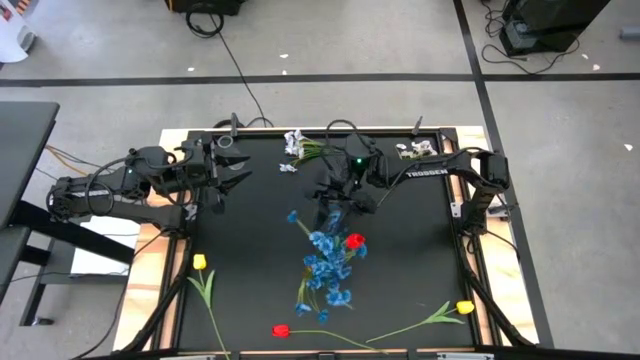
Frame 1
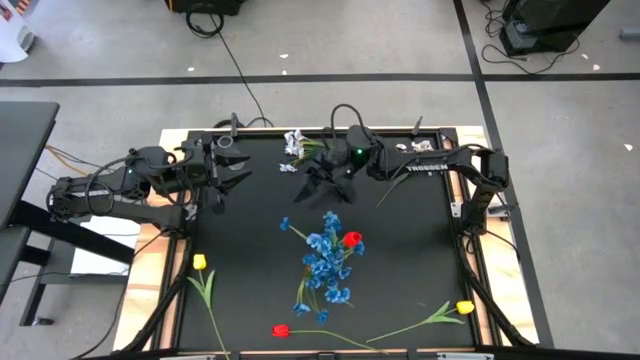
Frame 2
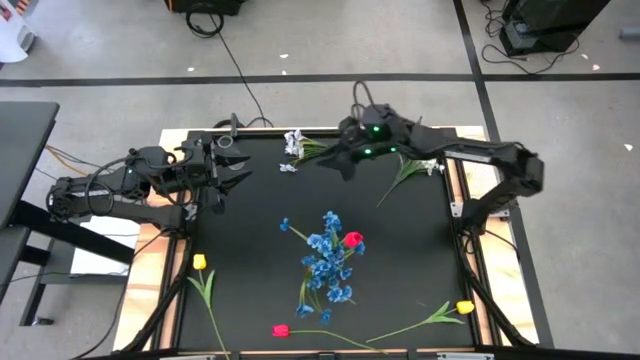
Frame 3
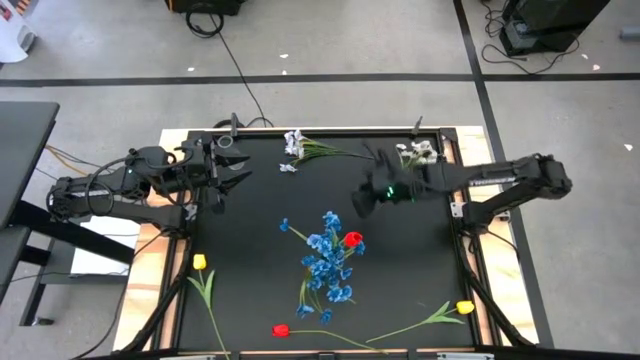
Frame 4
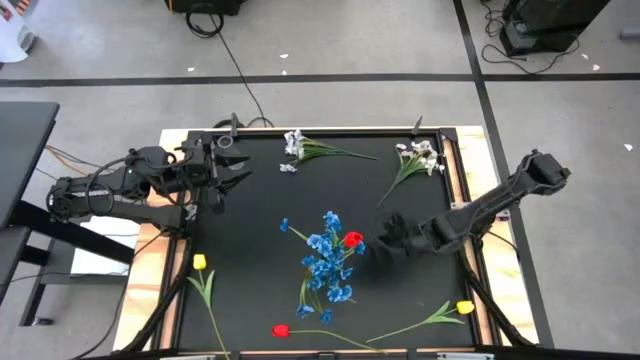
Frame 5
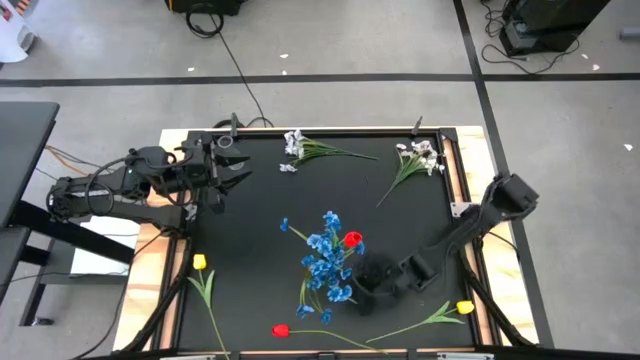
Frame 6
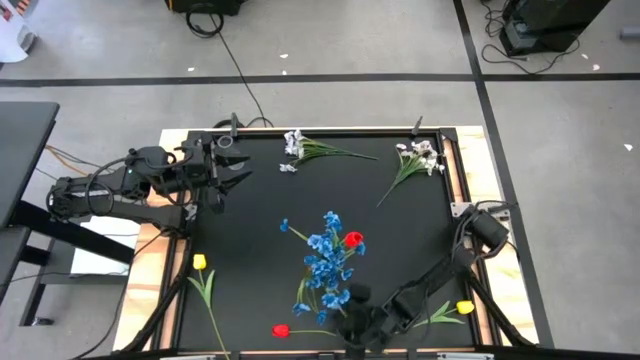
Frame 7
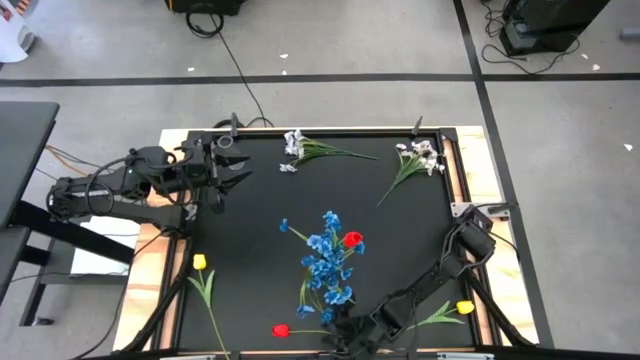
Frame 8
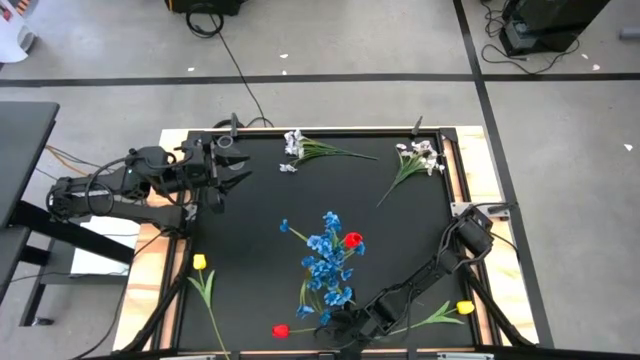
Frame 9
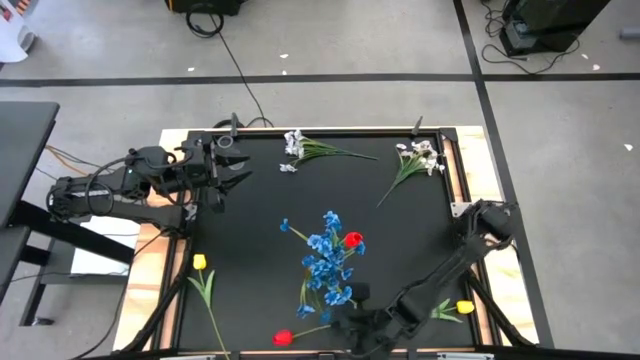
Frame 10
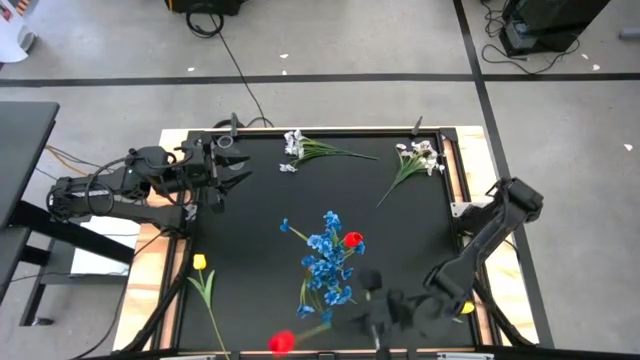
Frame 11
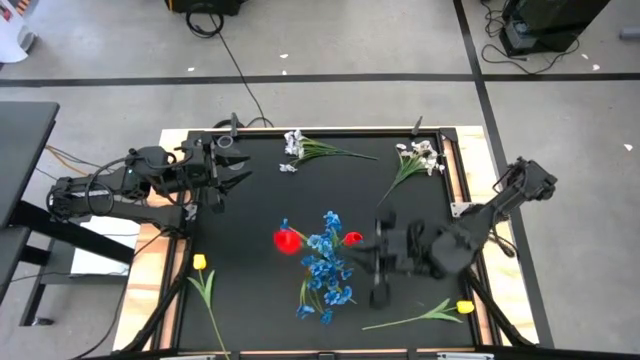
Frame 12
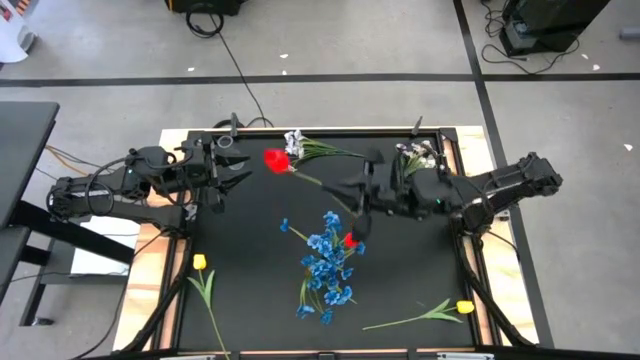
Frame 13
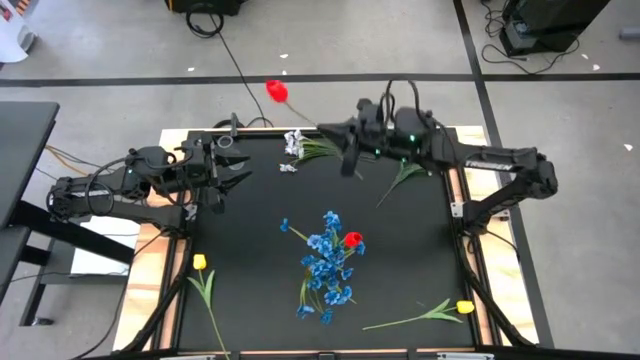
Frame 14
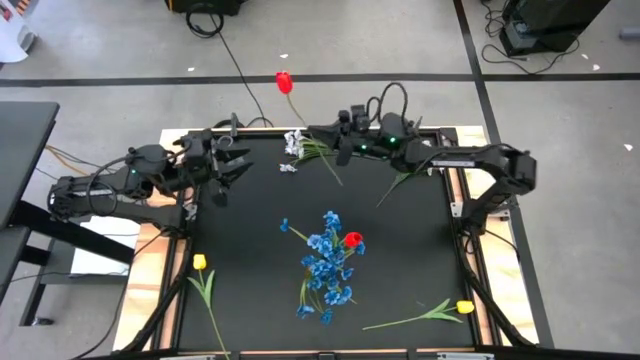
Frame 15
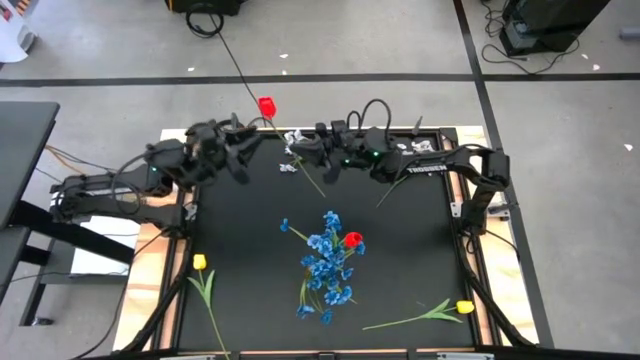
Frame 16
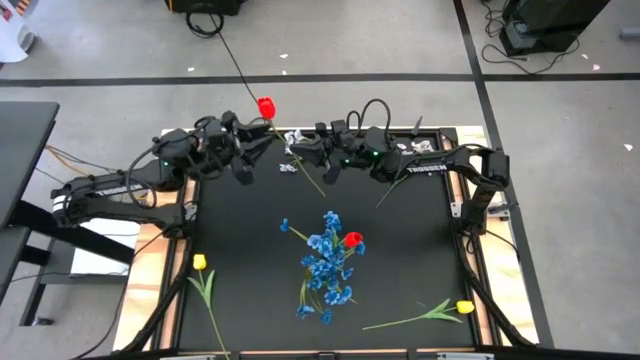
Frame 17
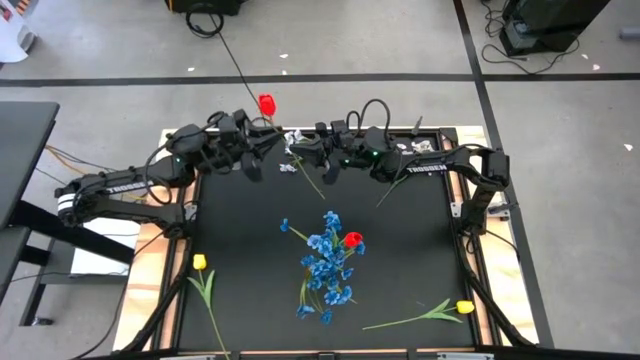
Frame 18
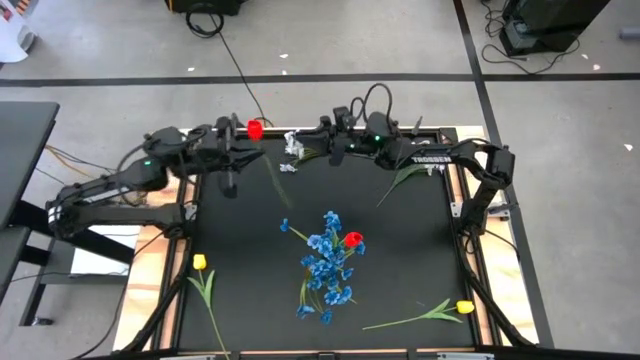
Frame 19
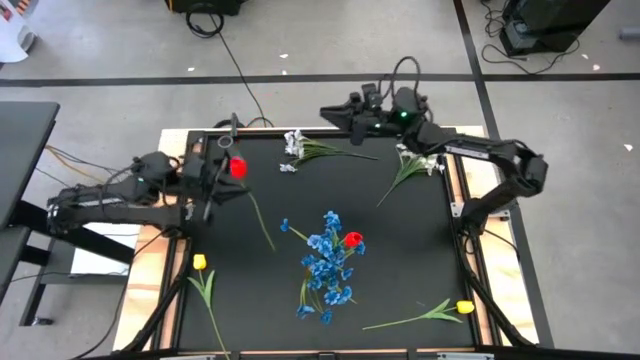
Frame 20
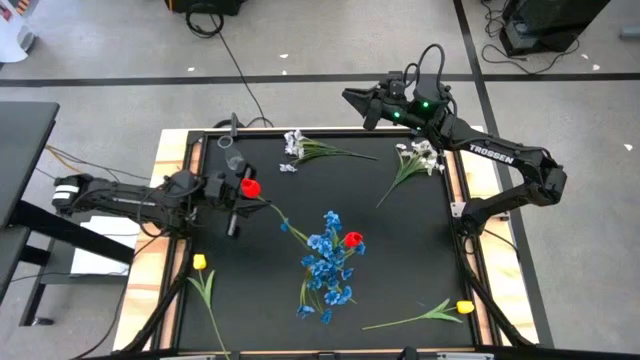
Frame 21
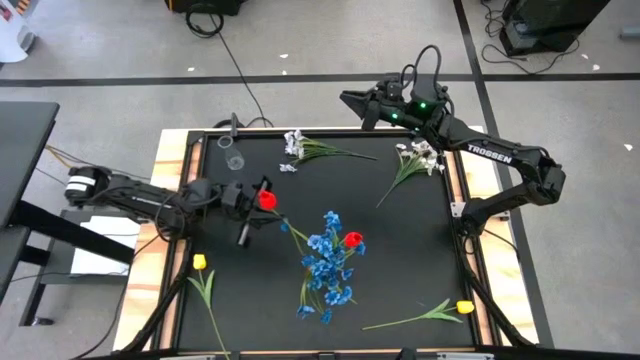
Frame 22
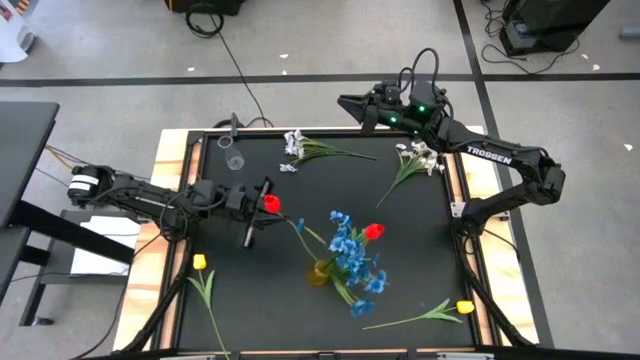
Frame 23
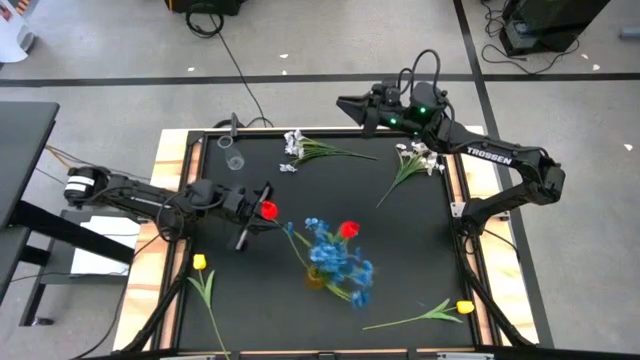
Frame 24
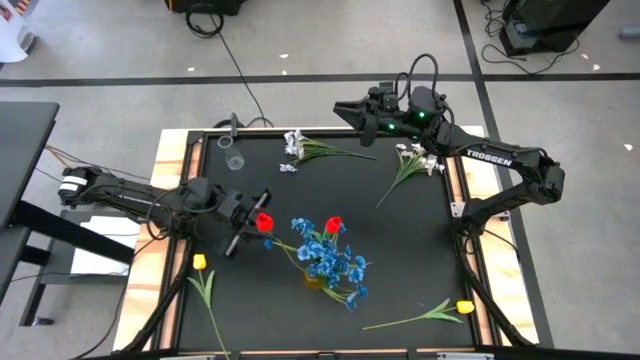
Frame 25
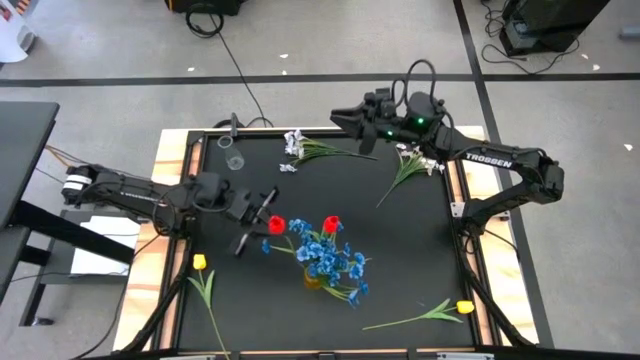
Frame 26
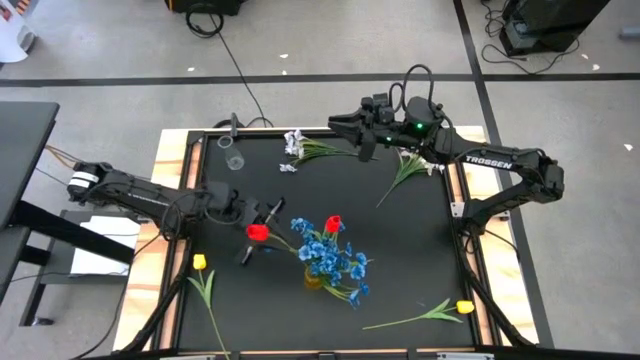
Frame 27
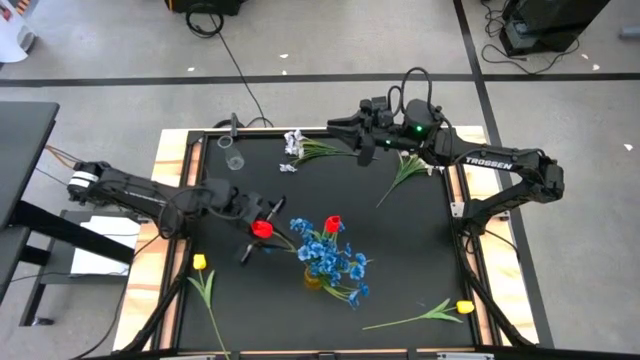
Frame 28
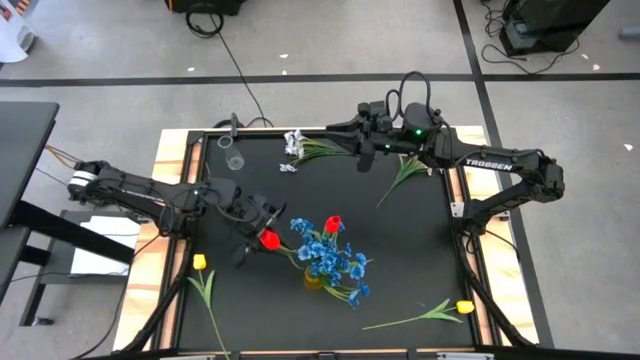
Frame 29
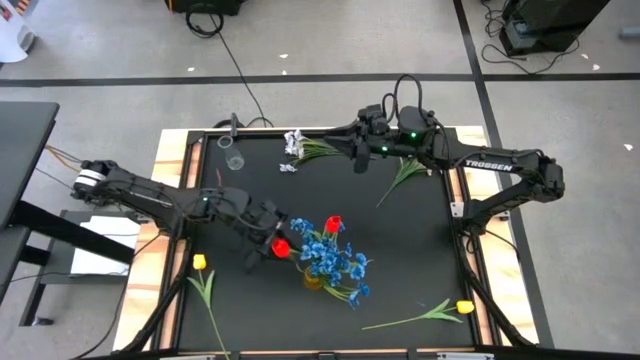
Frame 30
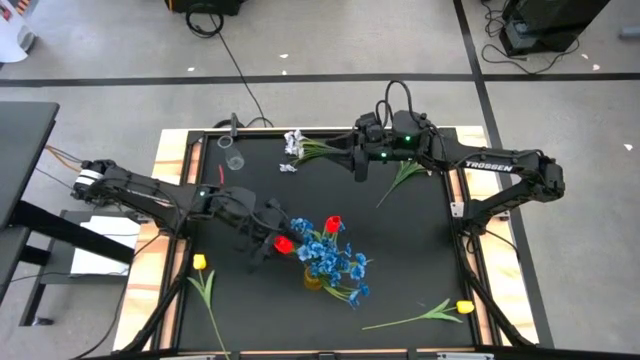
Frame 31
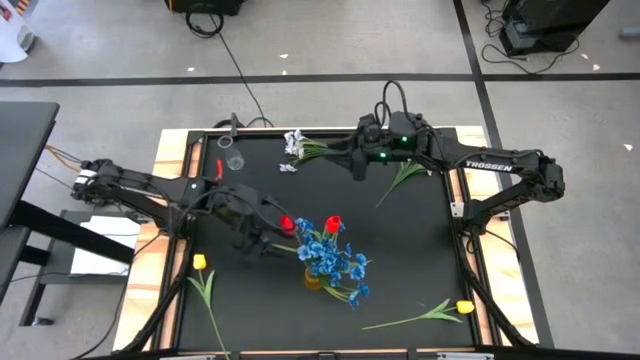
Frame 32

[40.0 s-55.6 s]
Task: Sort flowers into vase by color
Put the red flower into the yellow vase

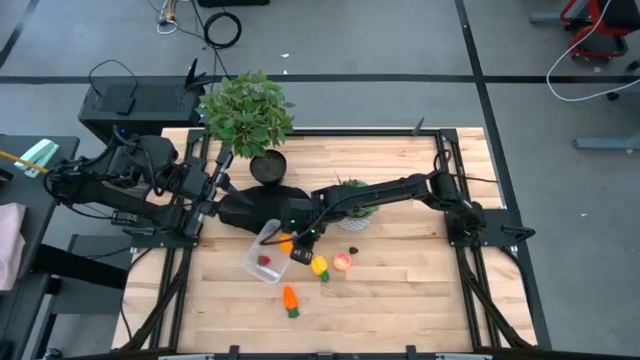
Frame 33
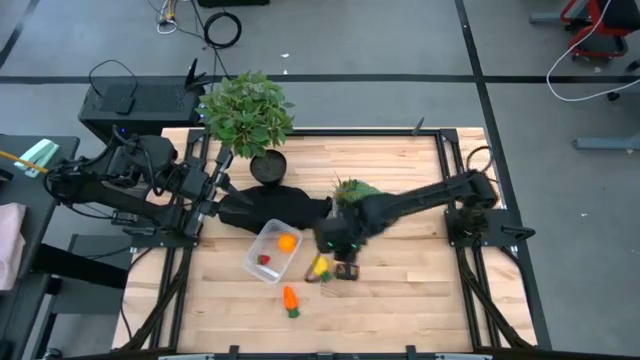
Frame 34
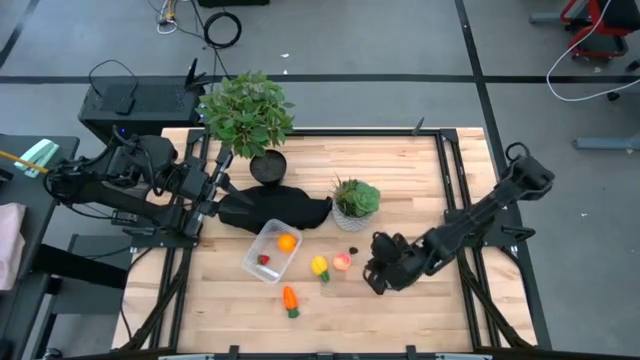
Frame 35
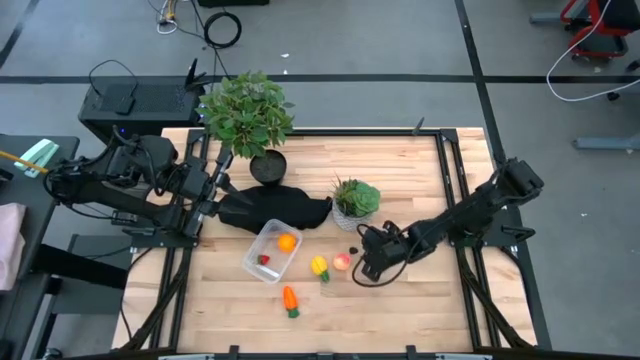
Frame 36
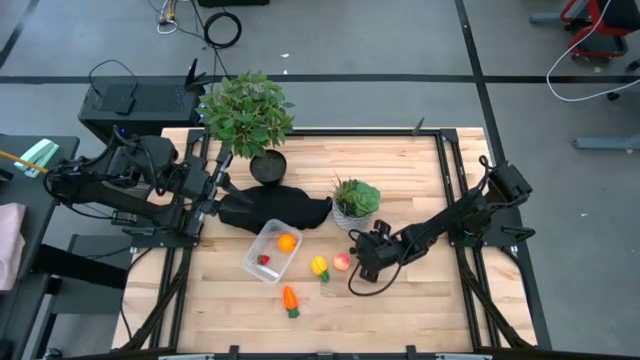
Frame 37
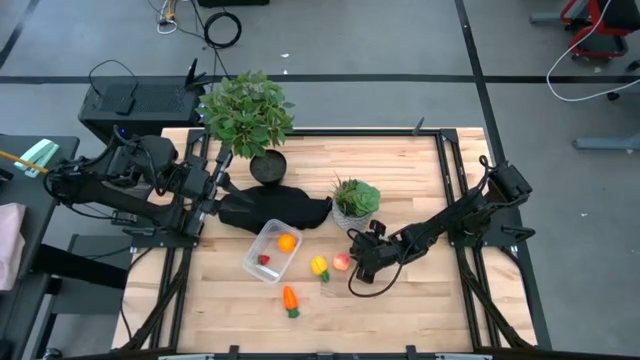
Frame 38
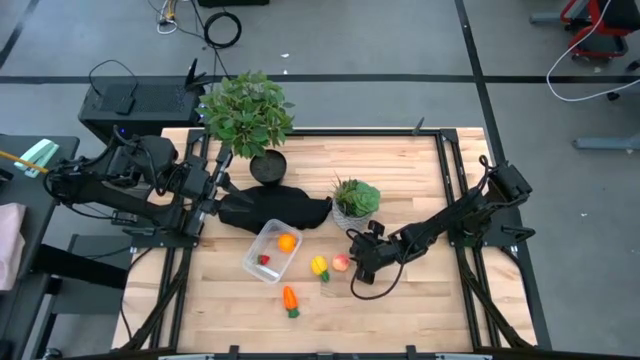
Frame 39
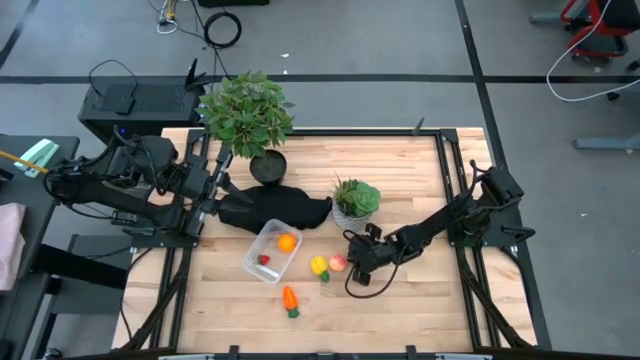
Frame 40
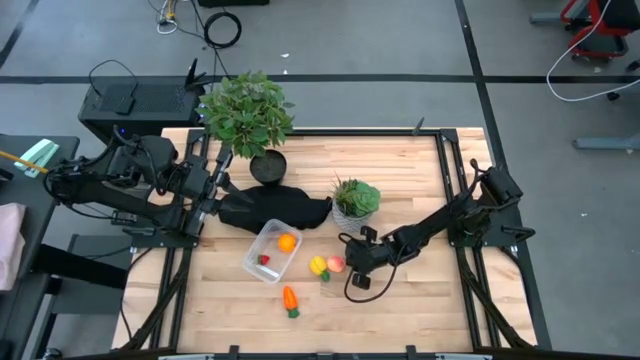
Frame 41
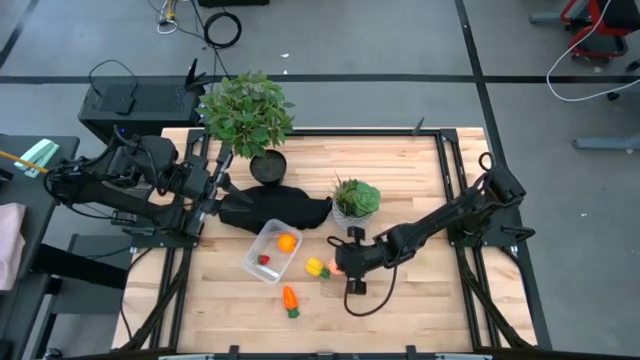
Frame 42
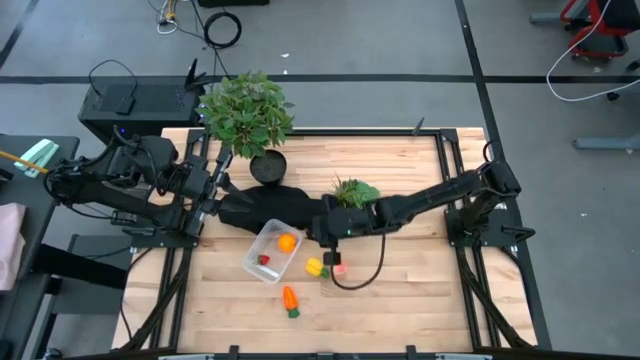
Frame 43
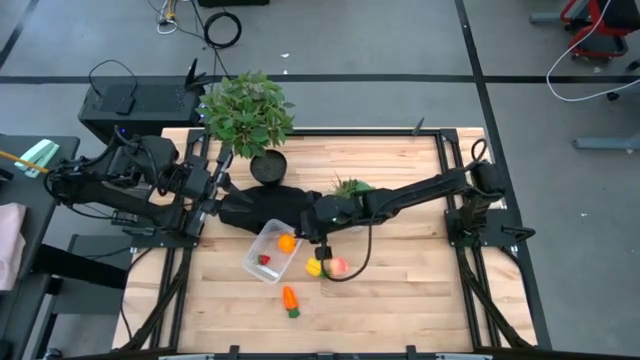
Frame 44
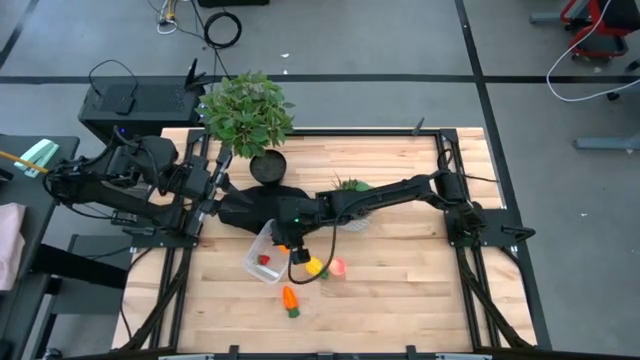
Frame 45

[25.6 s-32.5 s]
Task: Pick and placing Produce into tupperware
Put the blackberry into the transparent bin
